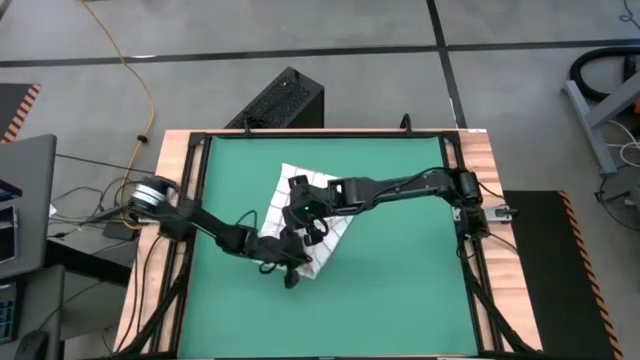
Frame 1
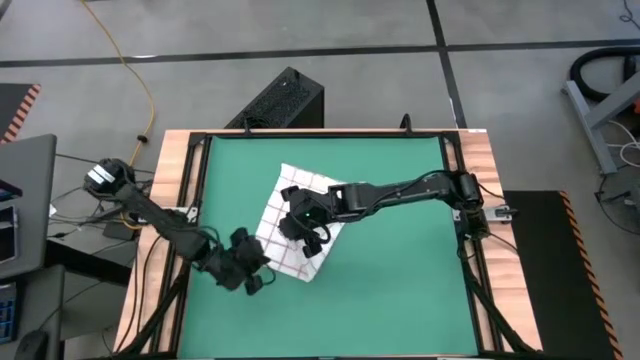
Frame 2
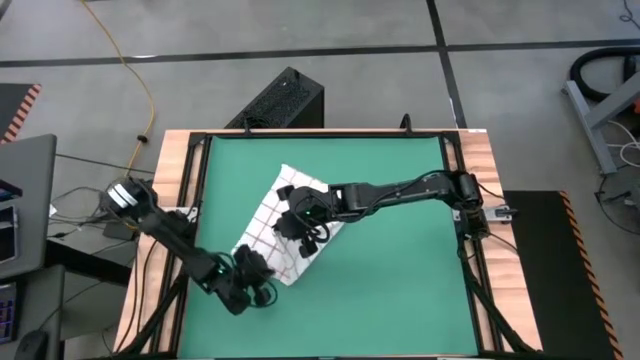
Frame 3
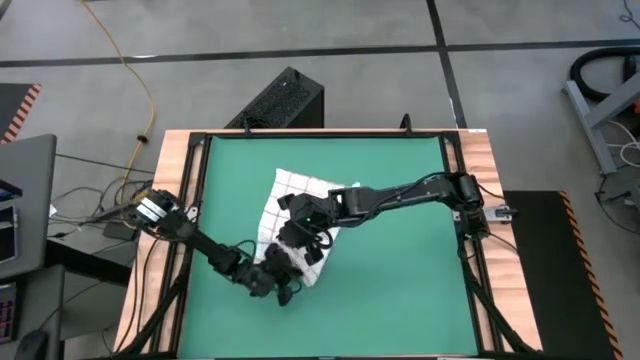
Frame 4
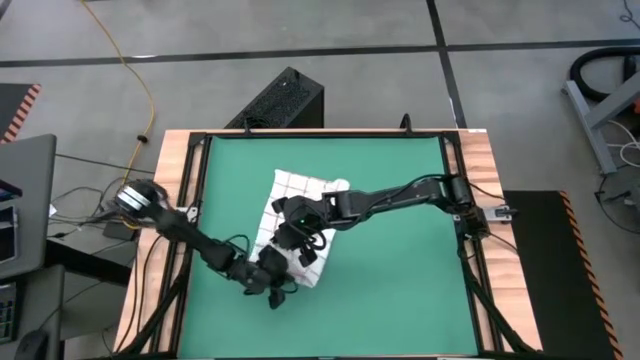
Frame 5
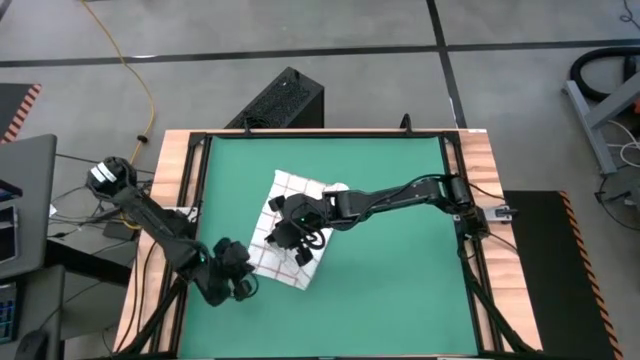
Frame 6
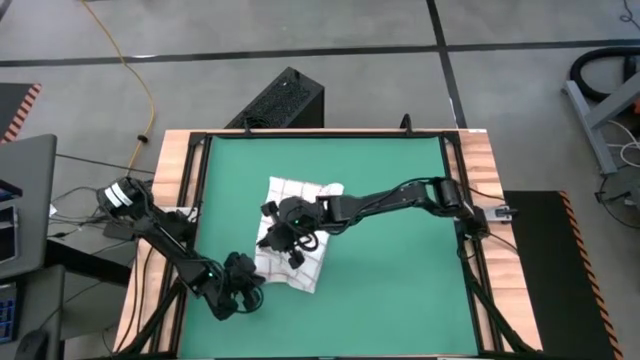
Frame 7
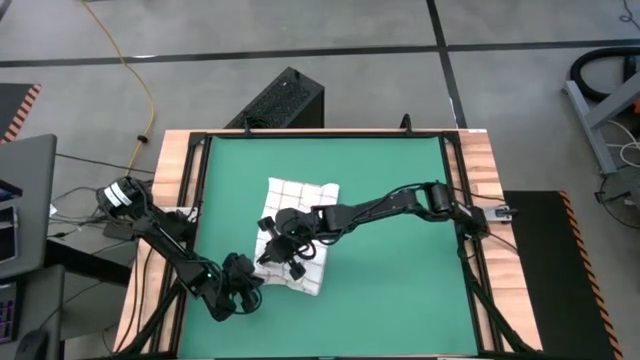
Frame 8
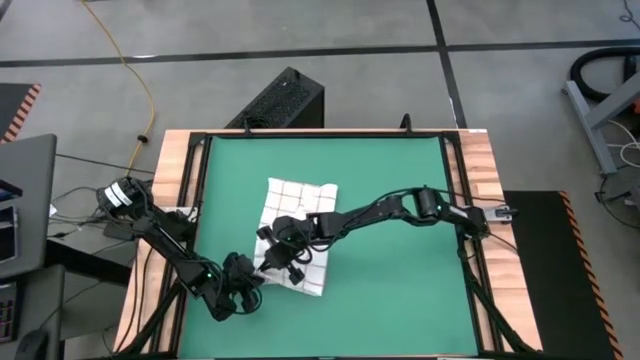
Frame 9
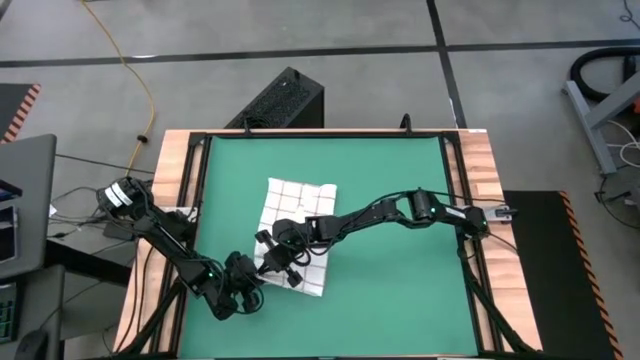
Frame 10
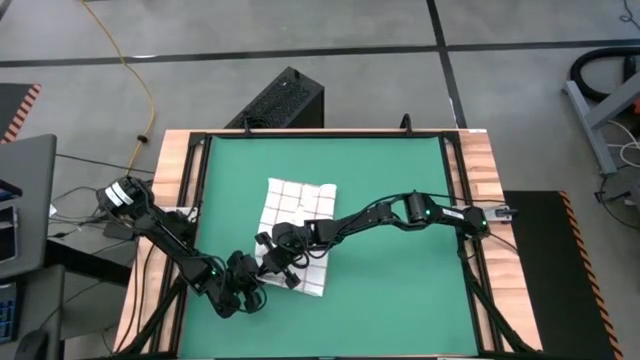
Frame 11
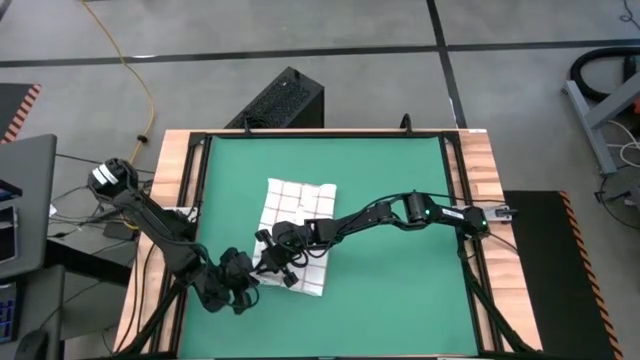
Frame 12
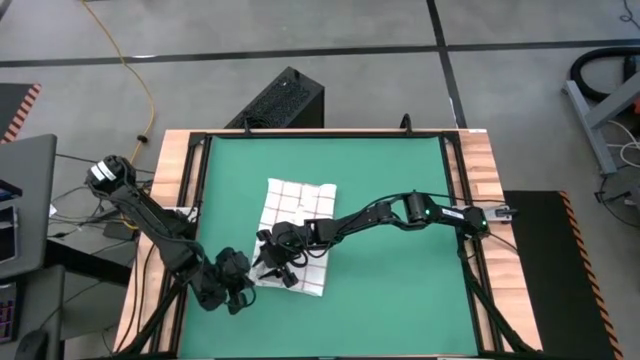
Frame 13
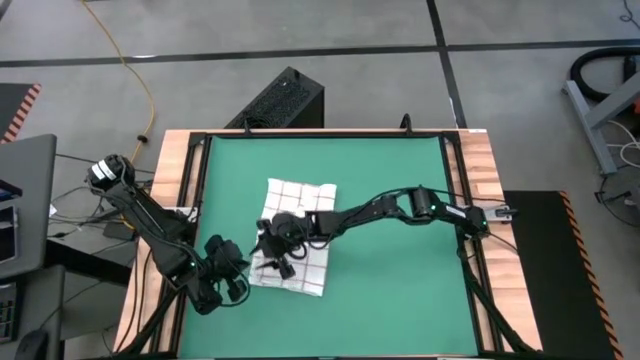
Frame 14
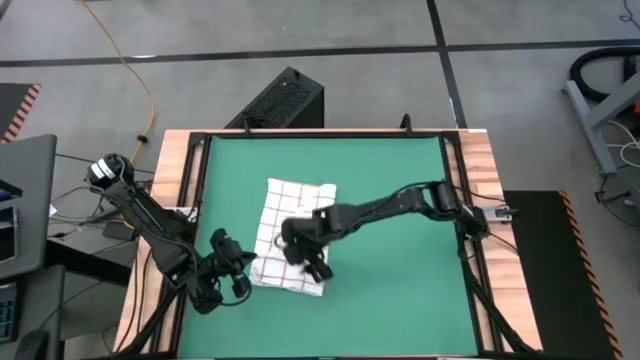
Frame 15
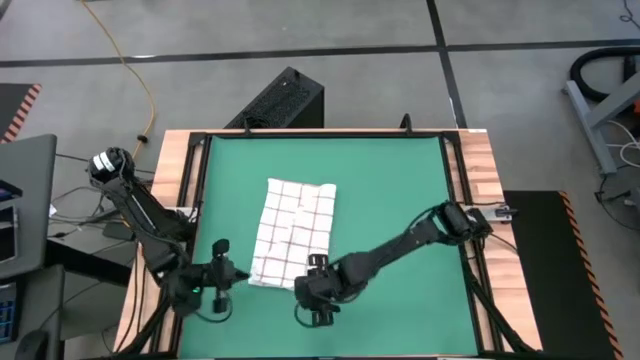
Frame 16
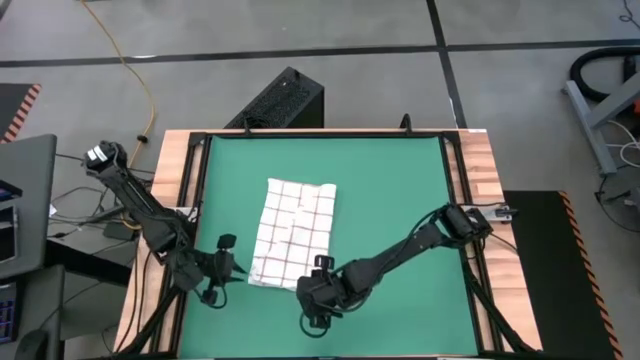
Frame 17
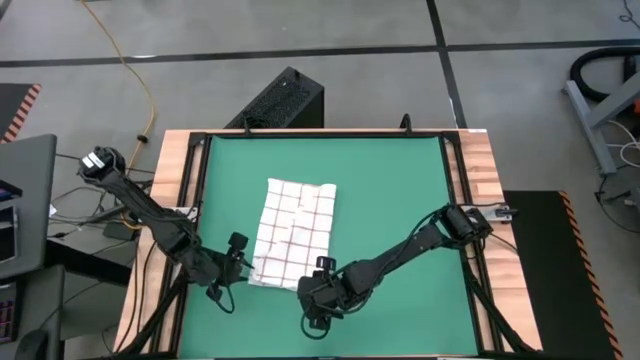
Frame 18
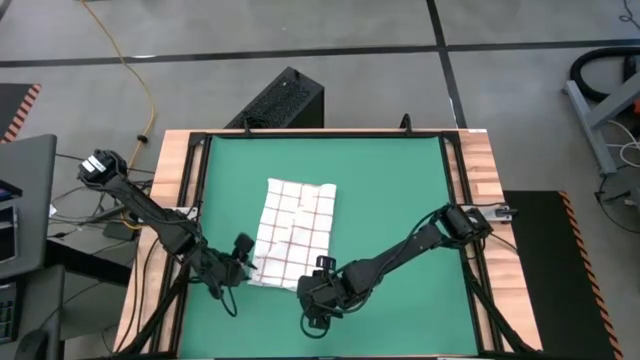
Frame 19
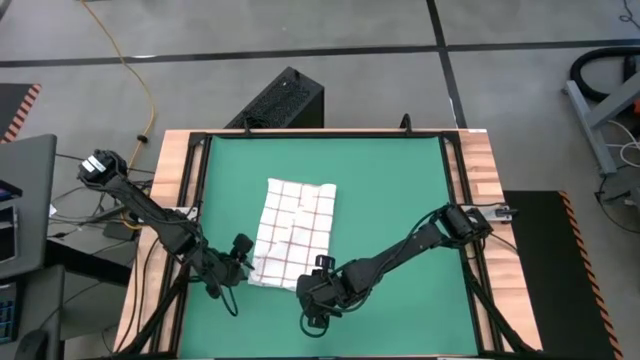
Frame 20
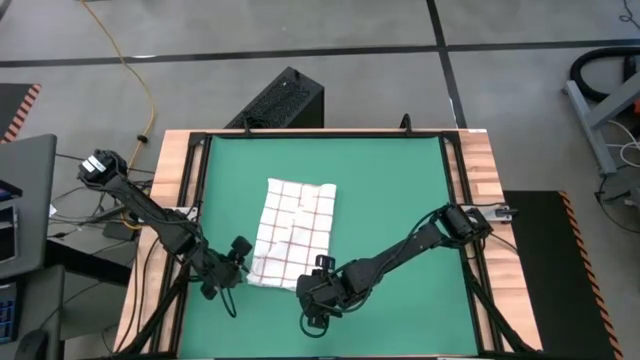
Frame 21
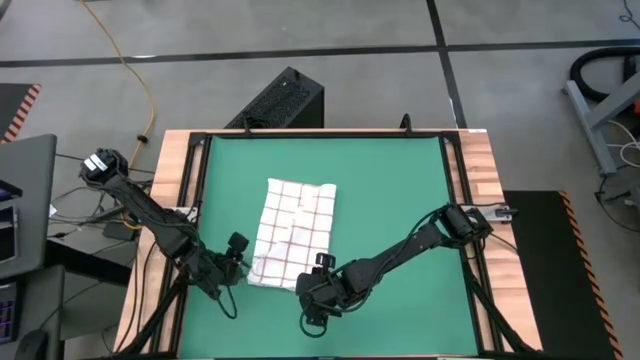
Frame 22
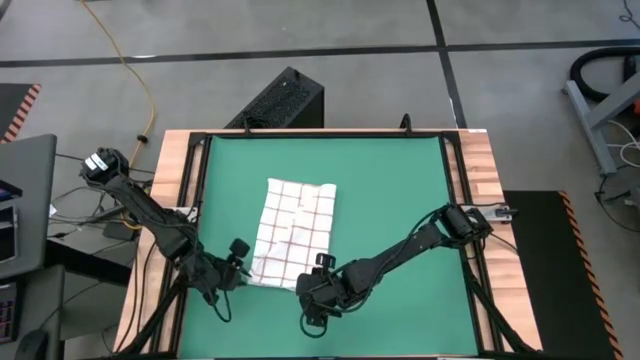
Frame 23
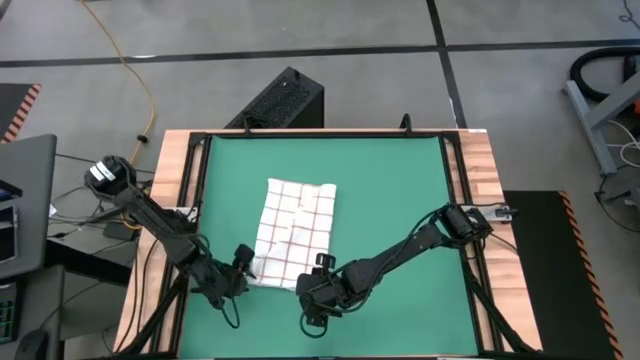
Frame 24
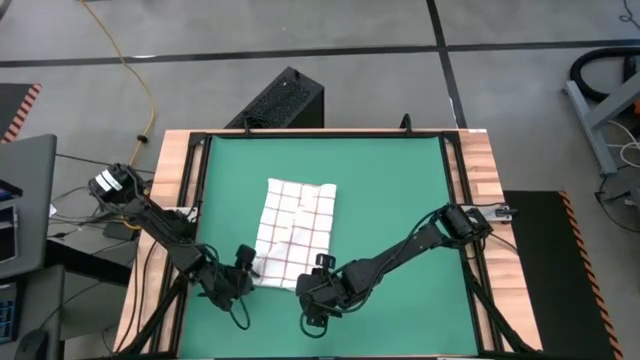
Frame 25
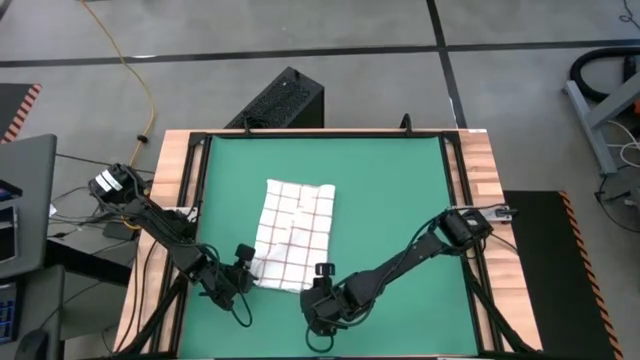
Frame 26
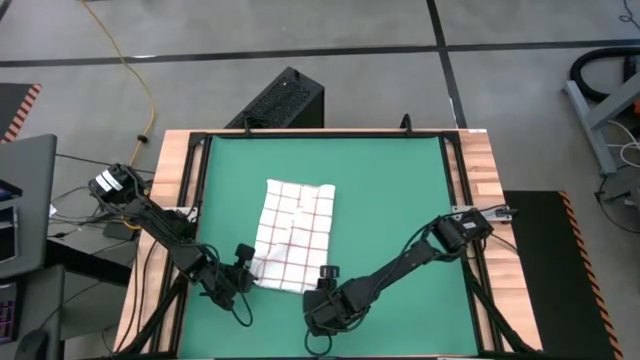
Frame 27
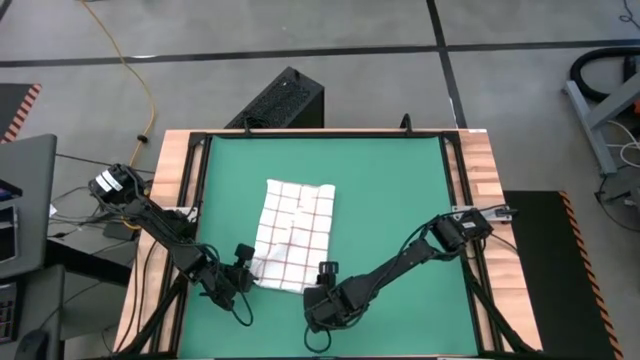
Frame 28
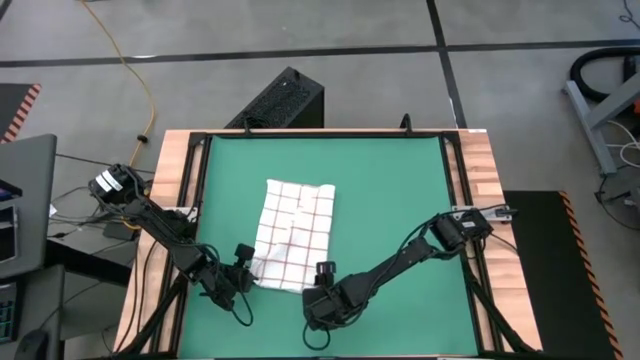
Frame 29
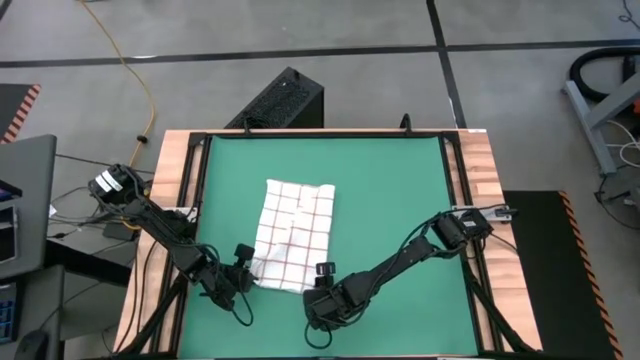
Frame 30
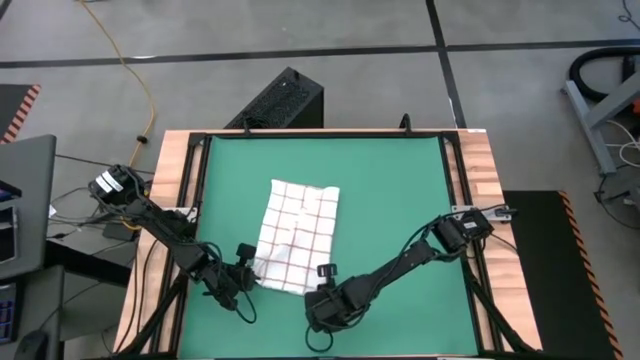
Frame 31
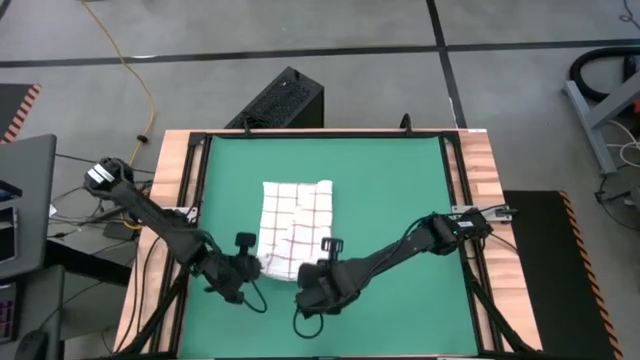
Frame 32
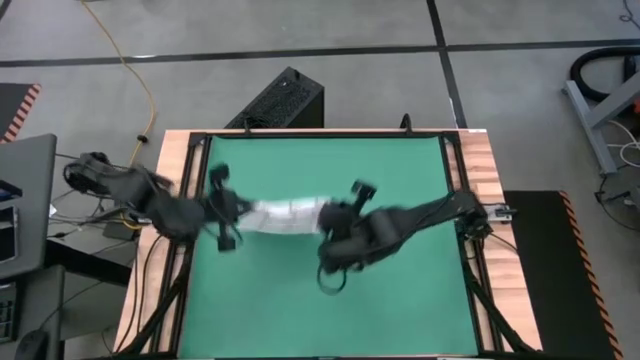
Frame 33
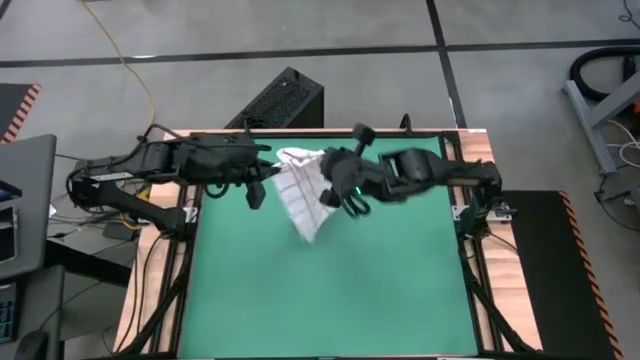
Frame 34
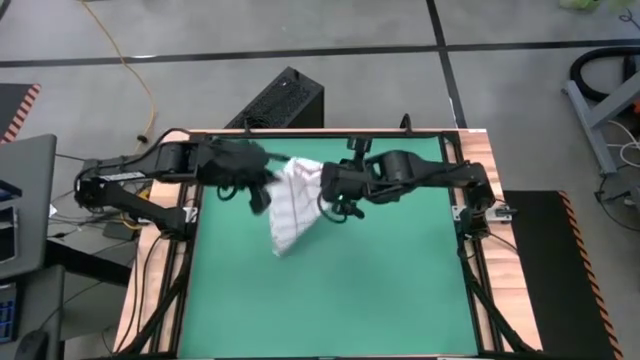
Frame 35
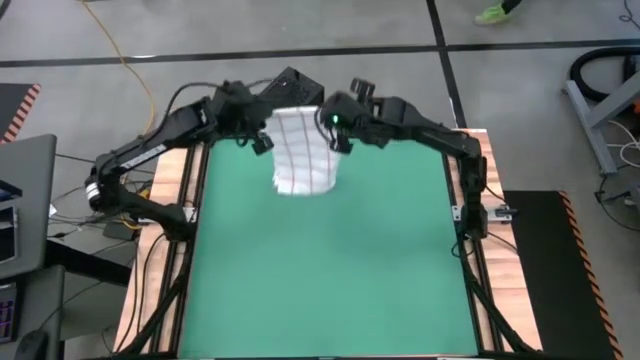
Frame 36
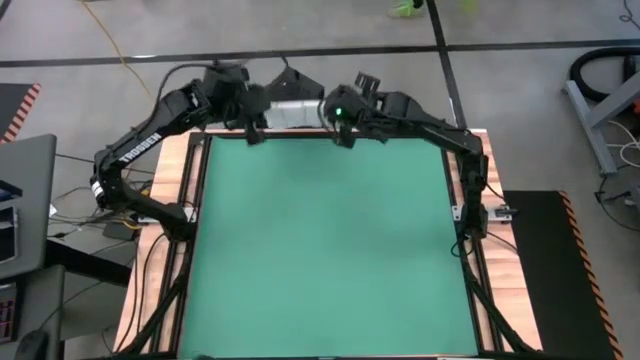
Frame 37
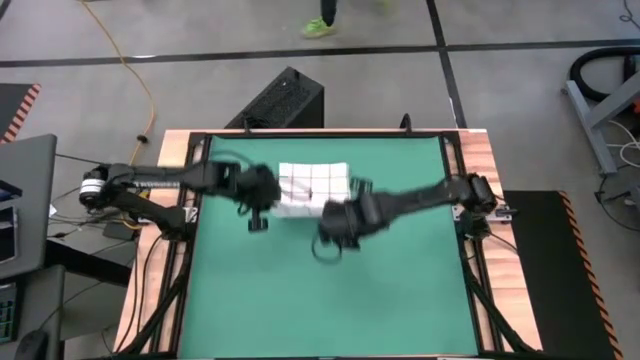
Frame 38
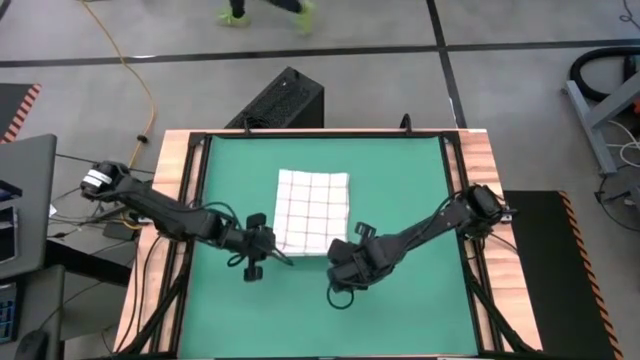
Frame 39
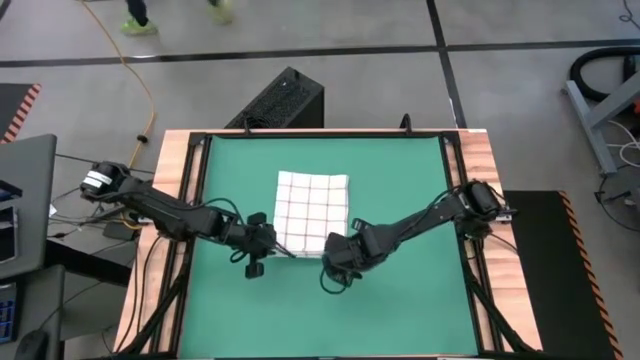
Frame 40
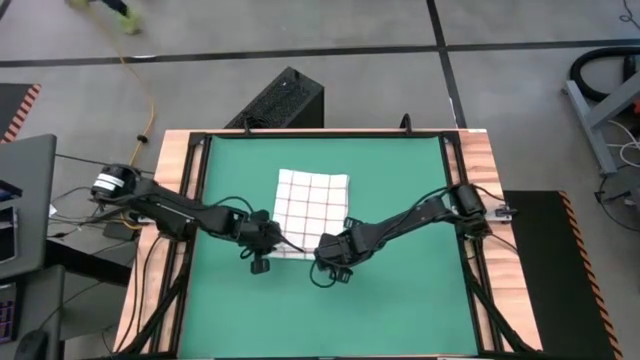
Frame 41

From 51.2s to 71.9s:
Task: Roll towel
Roll the white towel

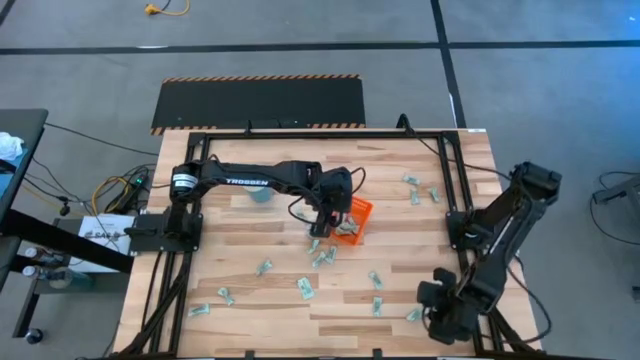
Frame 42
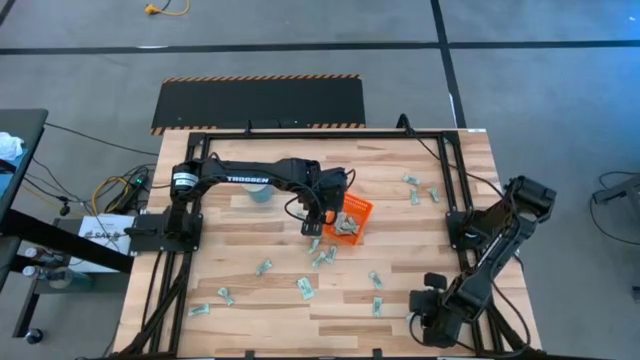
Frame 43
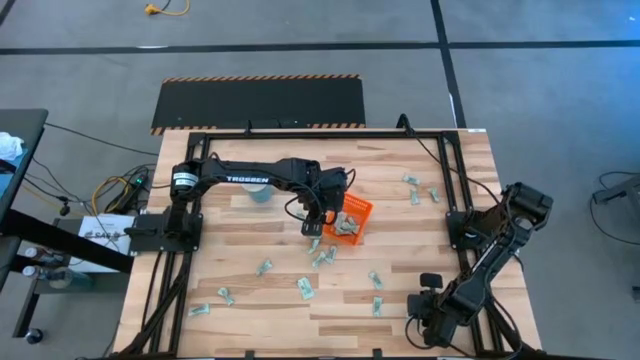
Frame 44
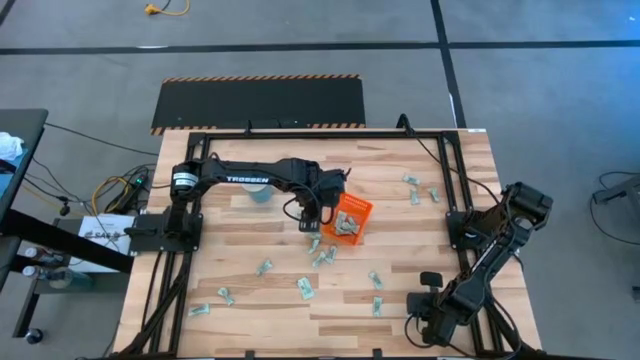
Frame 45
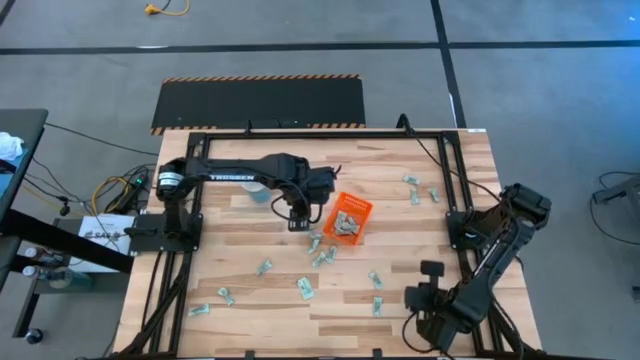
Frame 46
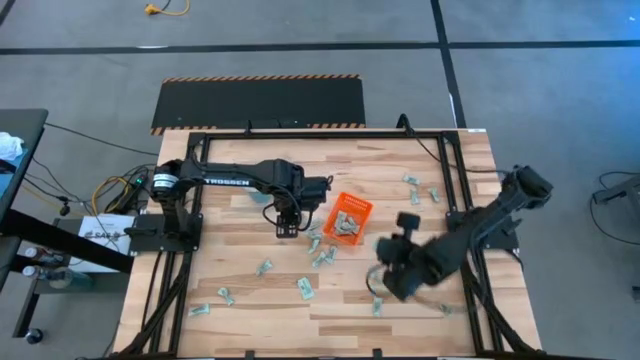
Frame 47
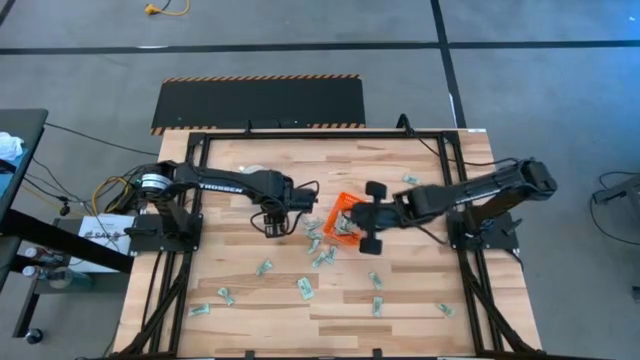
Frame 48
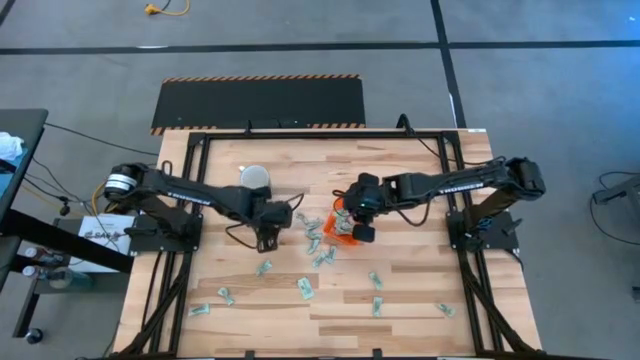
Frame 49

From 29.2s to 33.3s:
Task: Pick and place Stevia / Truvia into bins
Put the stevia packet into the basket
